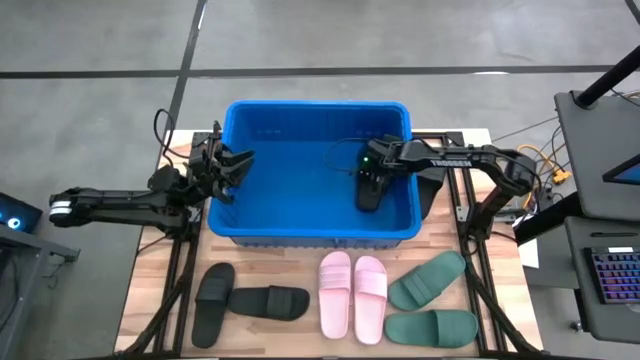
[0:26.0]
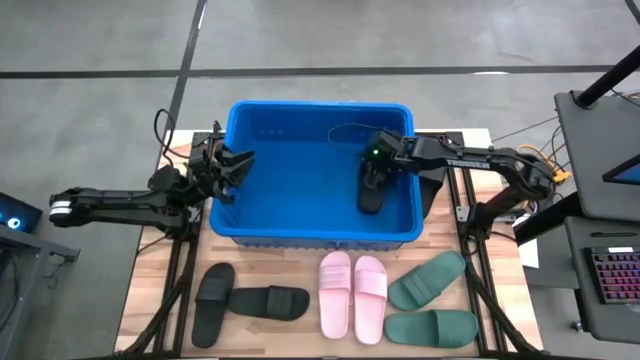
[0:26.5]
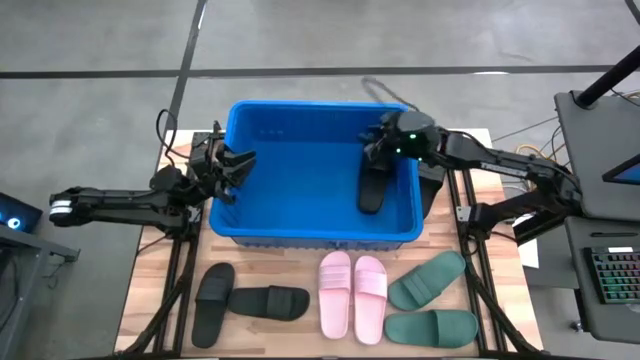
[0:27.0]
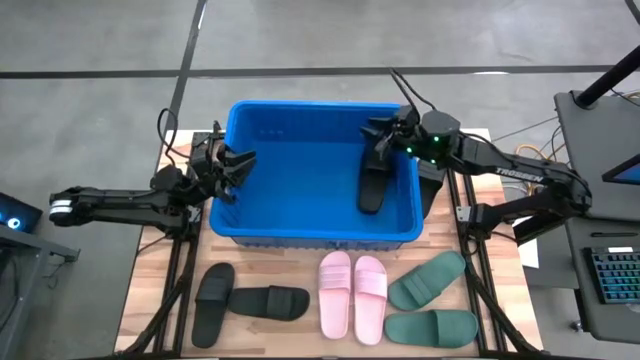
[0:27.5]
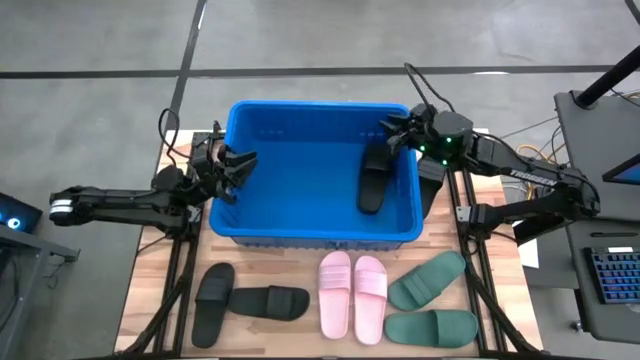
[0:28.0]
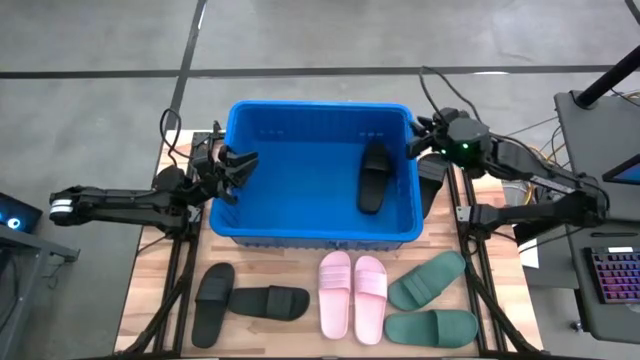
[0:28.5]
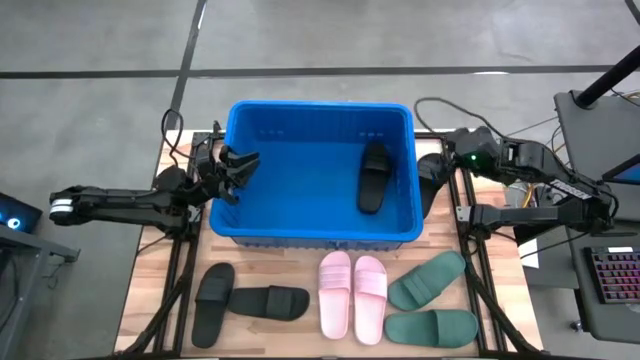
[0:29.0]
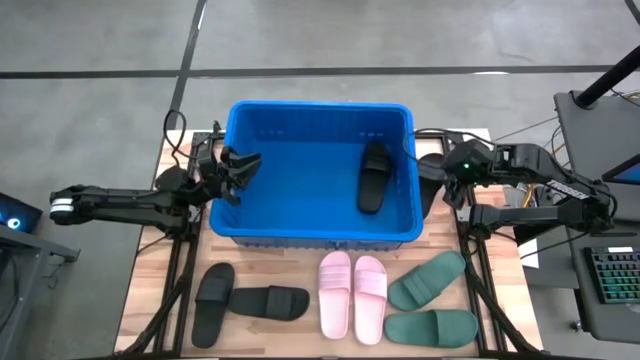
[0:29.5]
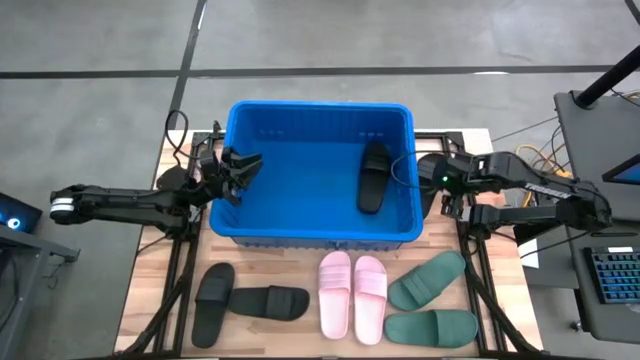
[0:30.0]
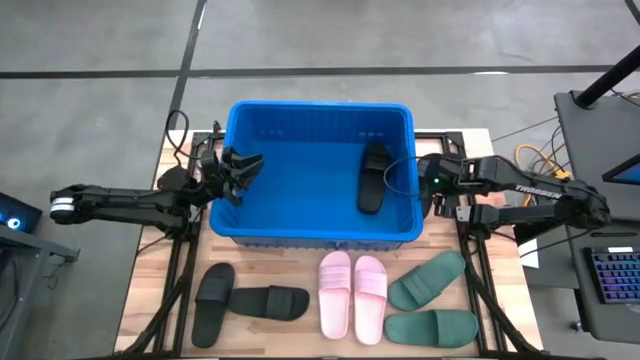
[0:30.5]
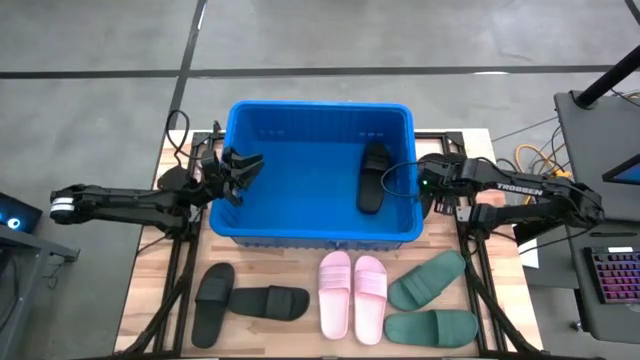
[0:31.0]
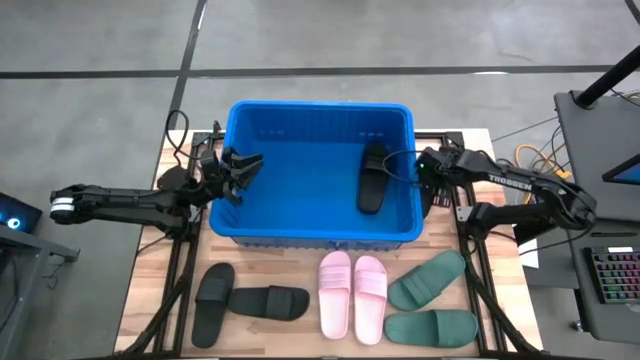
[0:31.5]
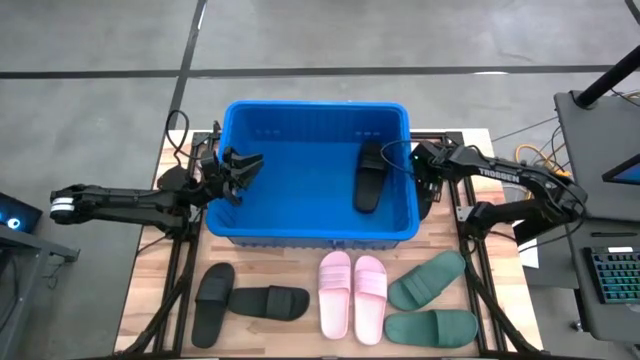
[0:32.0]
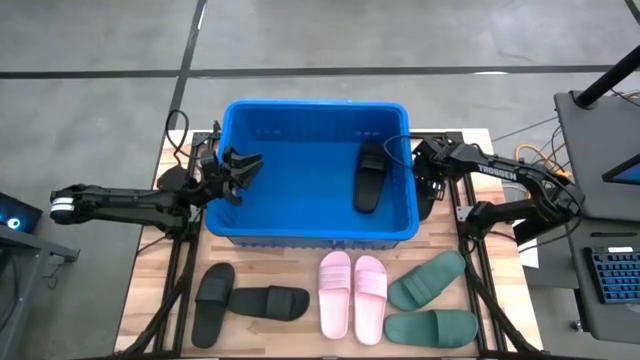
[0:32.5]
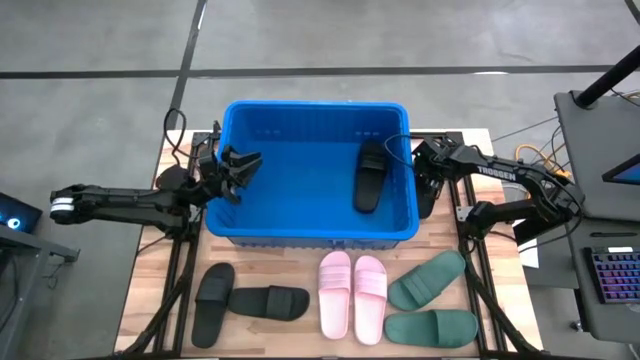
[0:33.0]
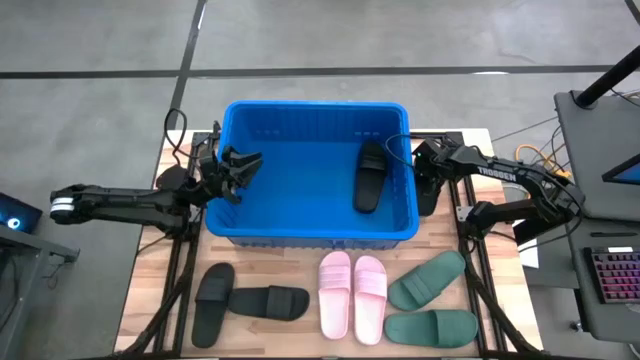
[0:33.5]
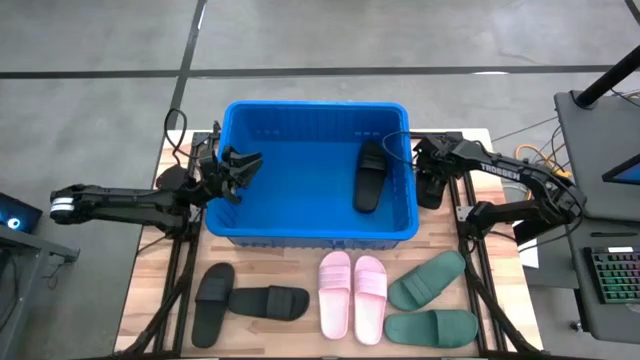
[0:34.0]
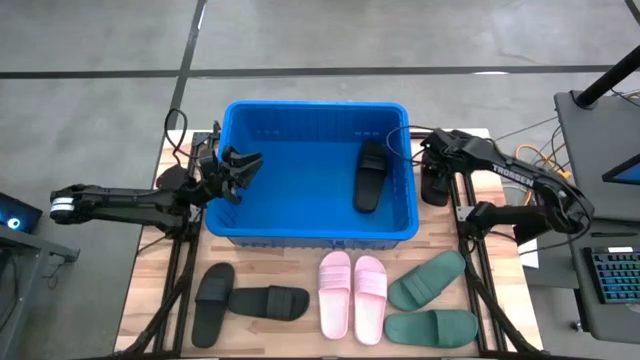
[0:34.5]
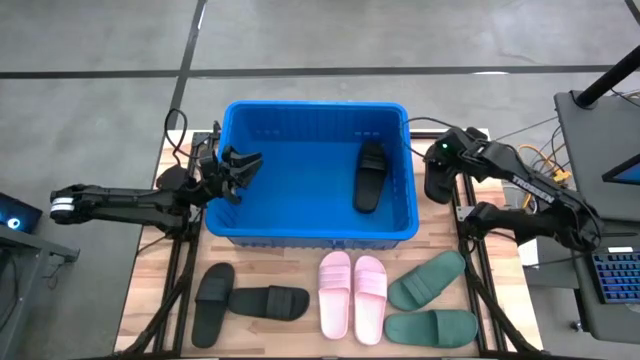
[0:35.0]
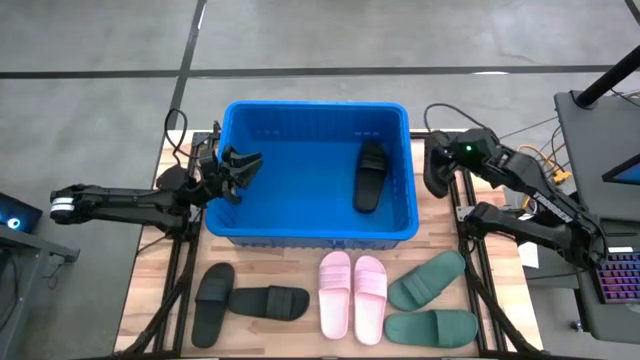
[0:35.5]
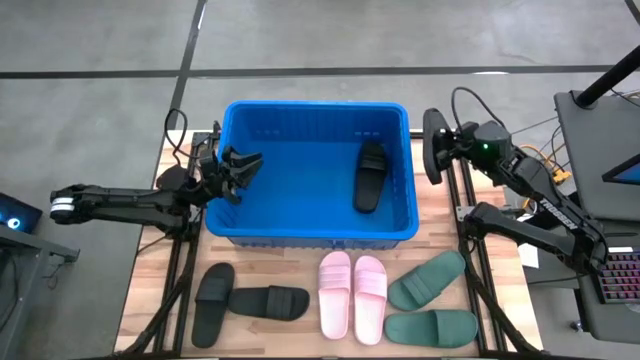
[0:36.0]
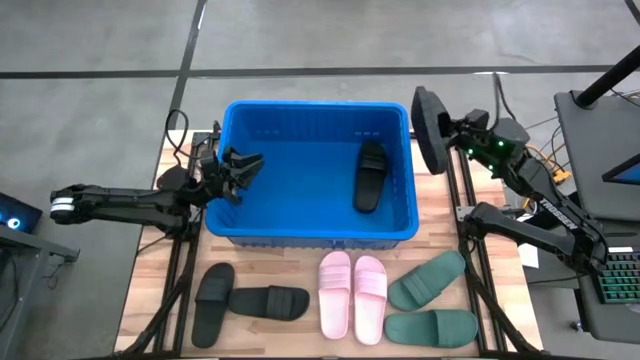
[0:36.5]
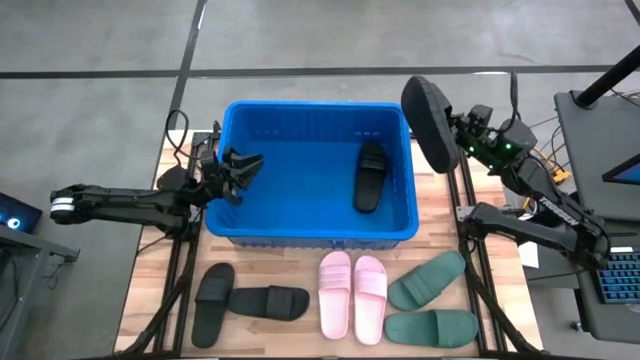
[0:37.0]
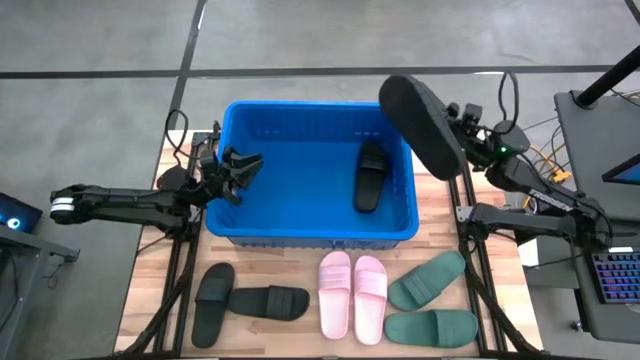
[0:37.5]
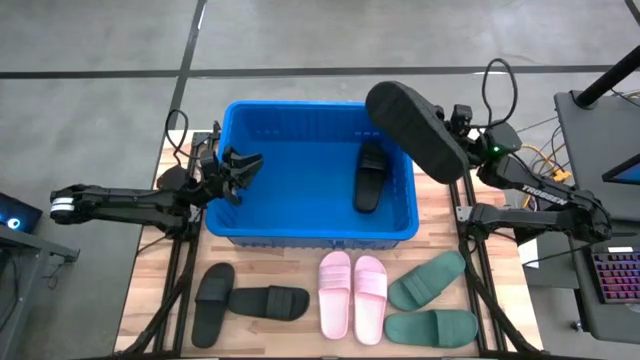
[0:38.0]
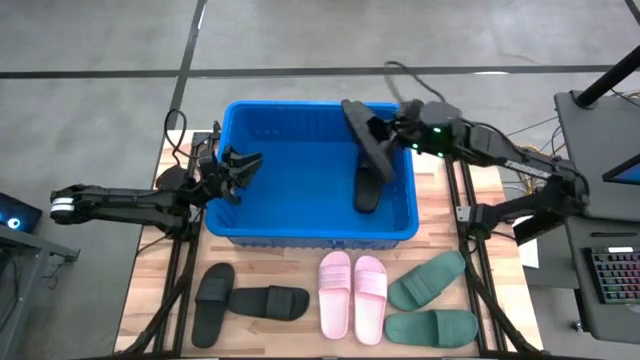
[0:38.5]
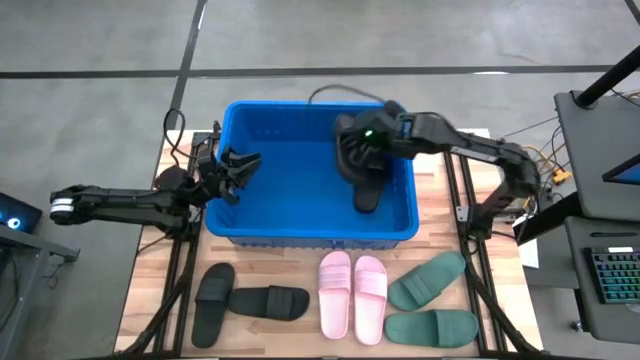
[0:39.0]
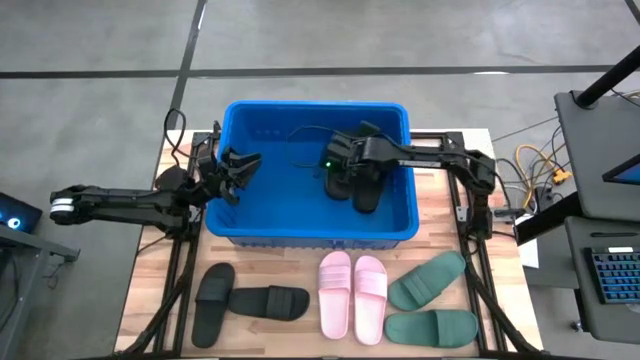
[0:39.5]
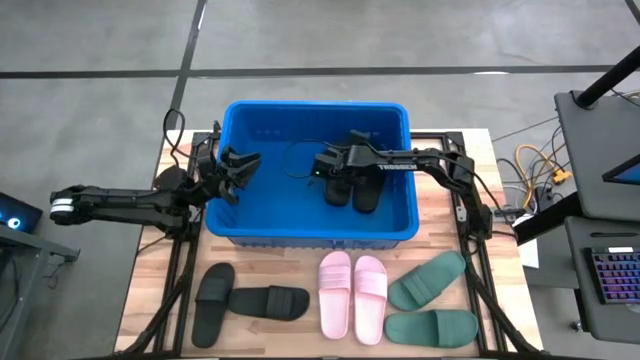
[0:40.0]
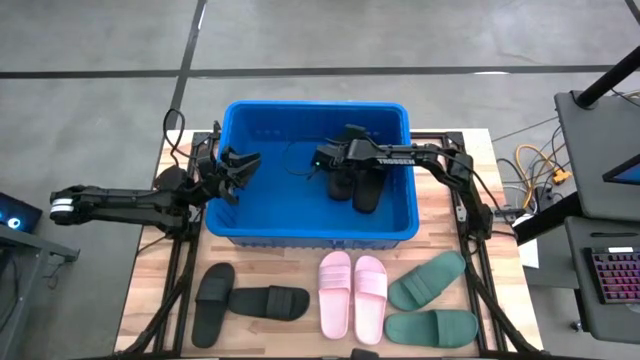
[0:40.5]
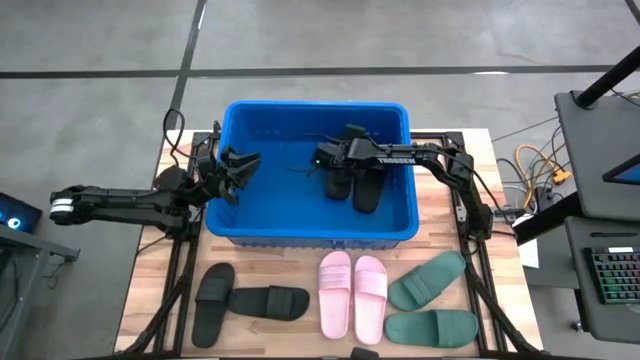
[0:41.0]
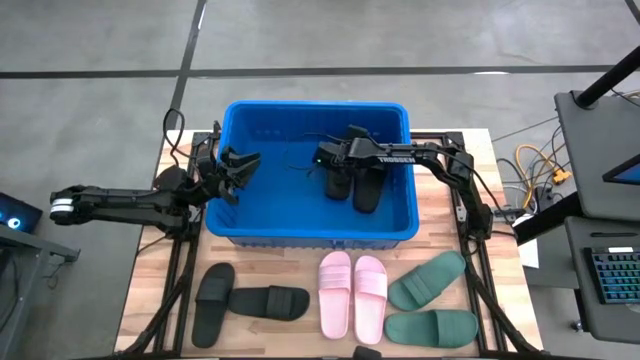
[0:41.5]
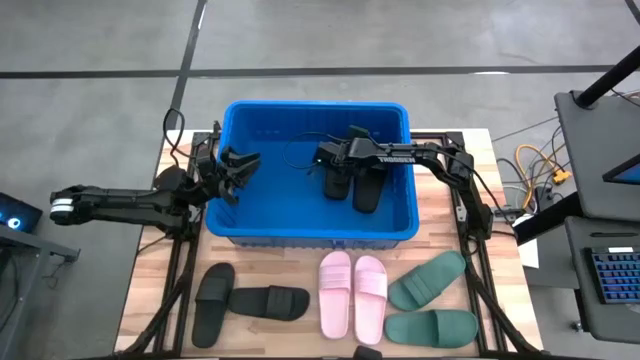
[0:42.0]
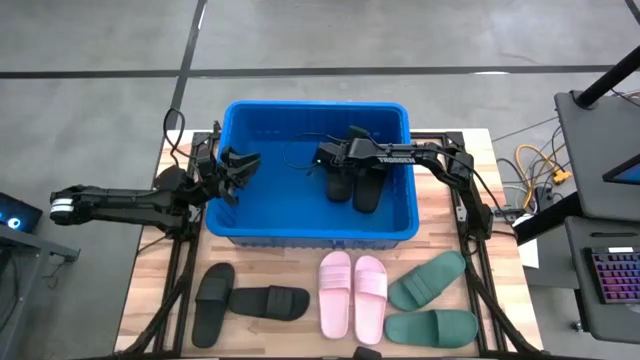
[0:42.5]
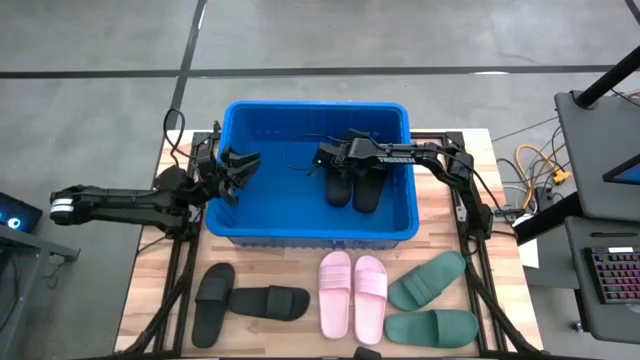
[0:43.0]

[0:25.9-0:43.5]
Task: Pick and place slides into bin
Put the top black slide into the blue bin
